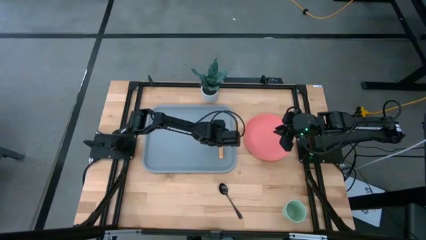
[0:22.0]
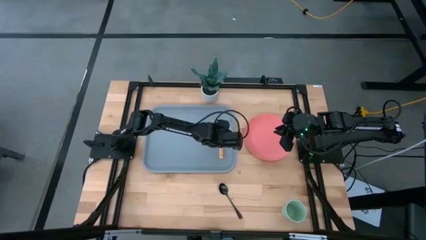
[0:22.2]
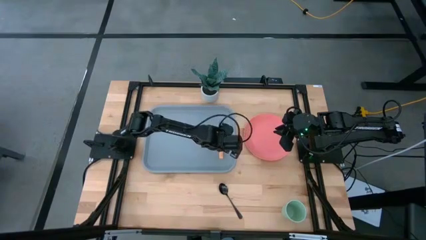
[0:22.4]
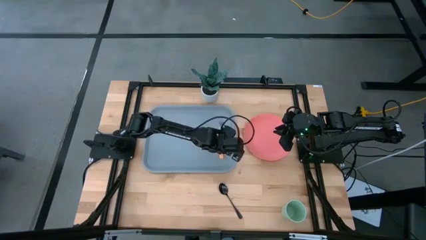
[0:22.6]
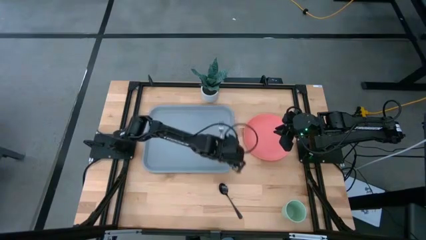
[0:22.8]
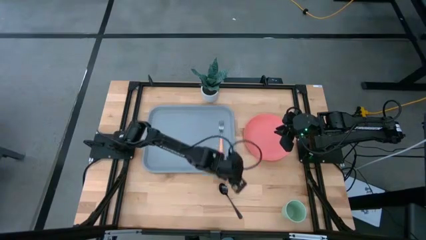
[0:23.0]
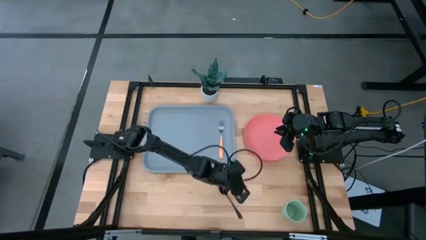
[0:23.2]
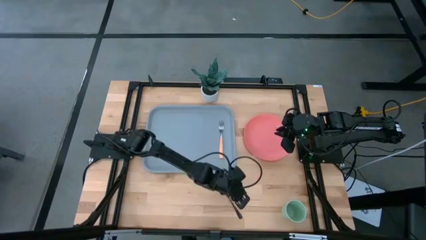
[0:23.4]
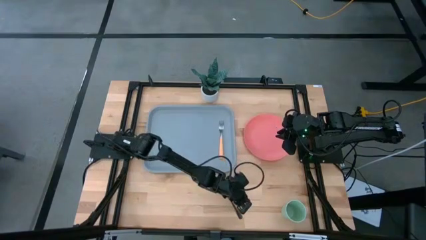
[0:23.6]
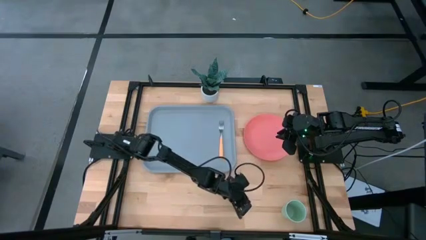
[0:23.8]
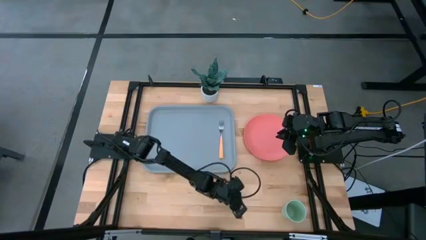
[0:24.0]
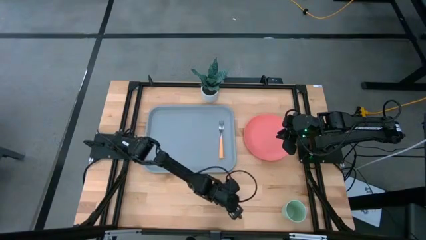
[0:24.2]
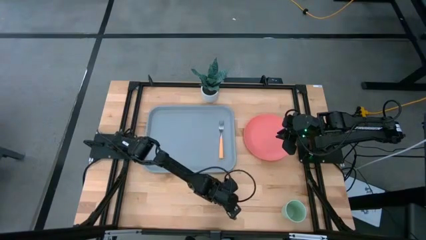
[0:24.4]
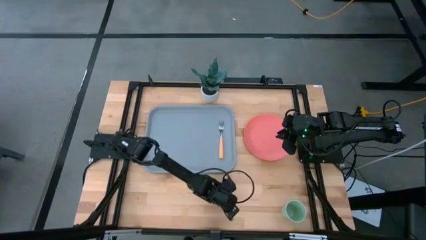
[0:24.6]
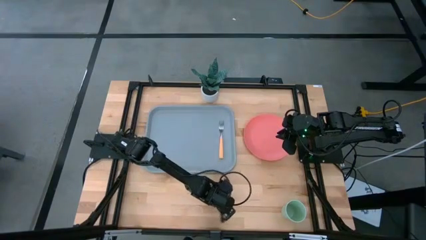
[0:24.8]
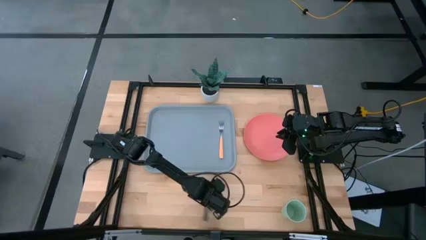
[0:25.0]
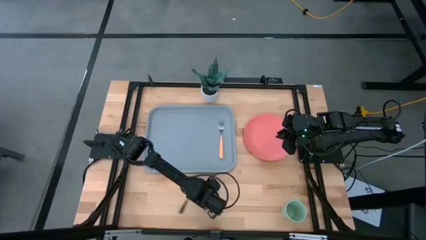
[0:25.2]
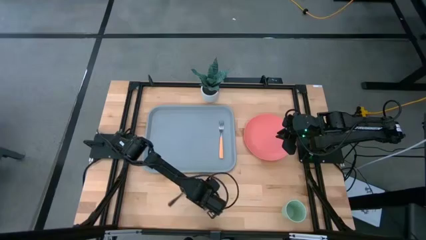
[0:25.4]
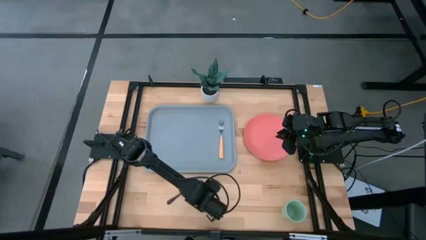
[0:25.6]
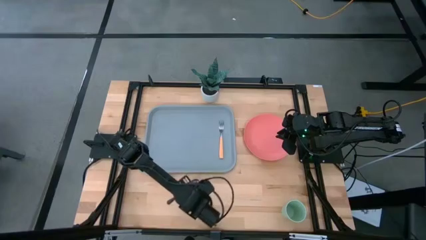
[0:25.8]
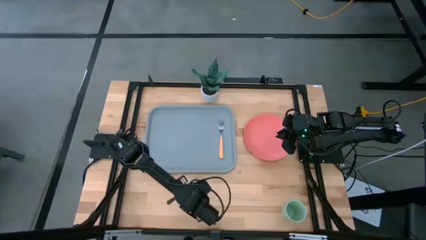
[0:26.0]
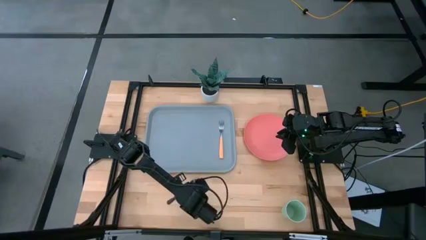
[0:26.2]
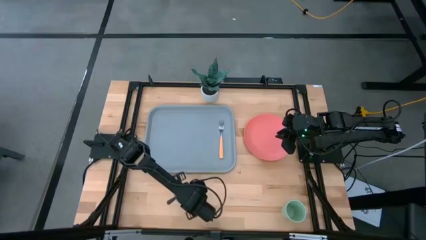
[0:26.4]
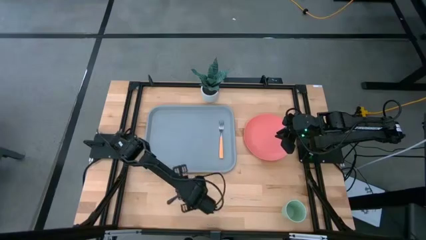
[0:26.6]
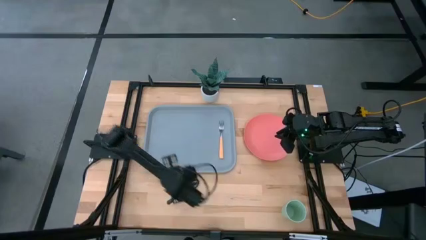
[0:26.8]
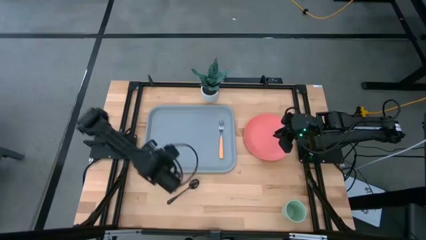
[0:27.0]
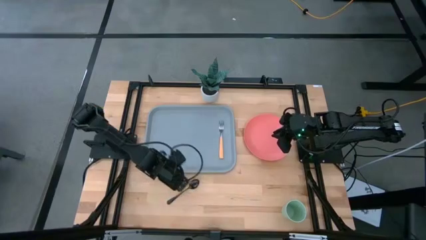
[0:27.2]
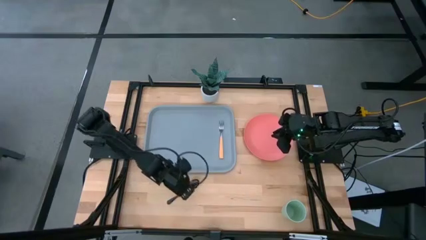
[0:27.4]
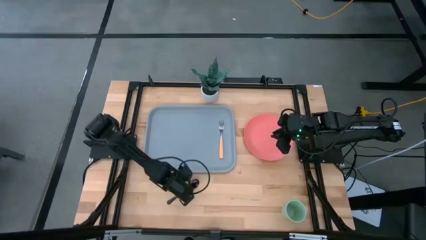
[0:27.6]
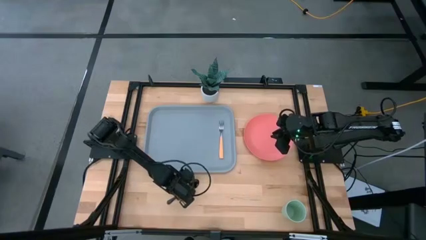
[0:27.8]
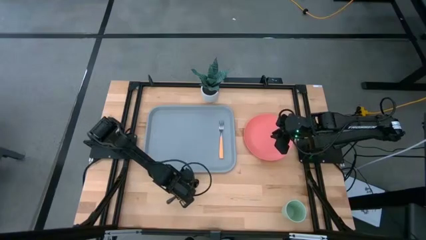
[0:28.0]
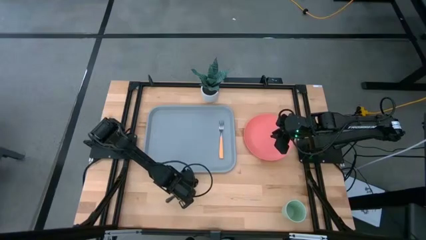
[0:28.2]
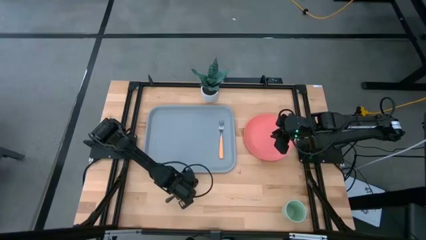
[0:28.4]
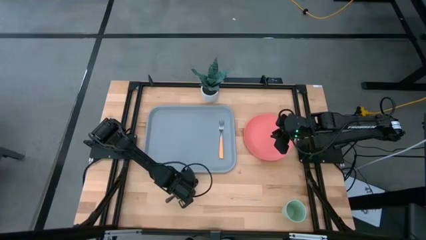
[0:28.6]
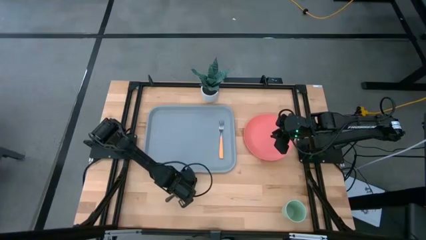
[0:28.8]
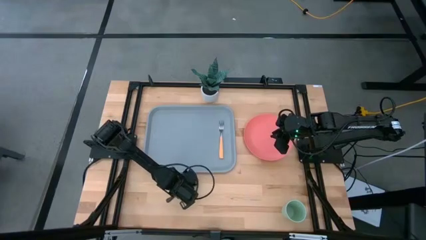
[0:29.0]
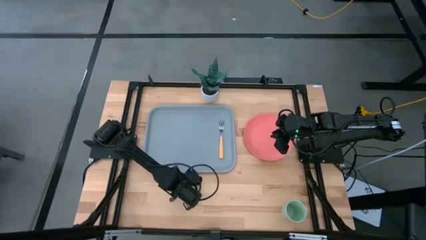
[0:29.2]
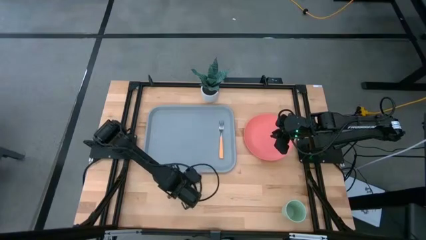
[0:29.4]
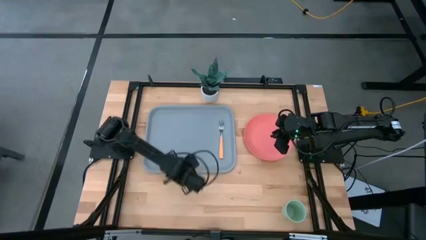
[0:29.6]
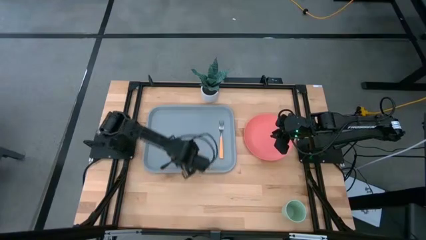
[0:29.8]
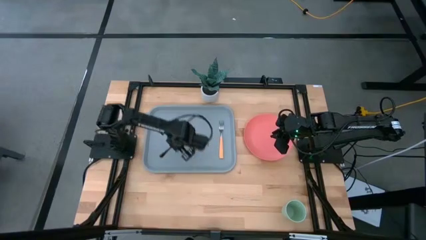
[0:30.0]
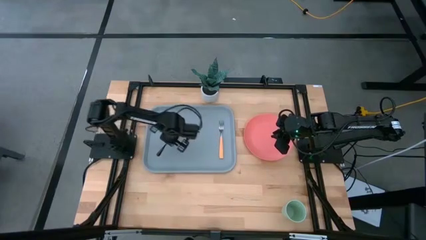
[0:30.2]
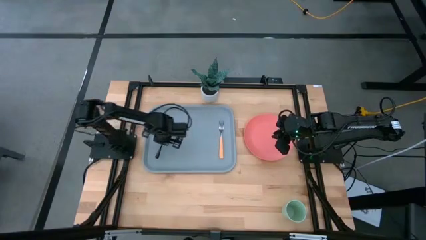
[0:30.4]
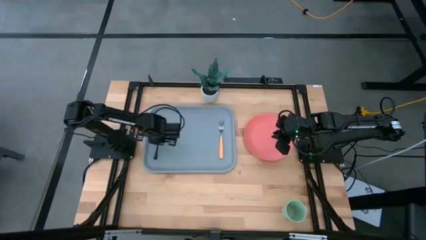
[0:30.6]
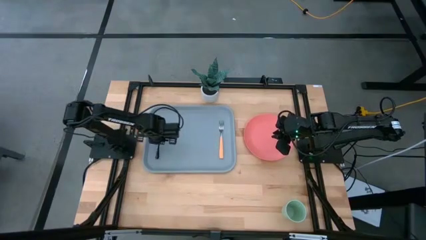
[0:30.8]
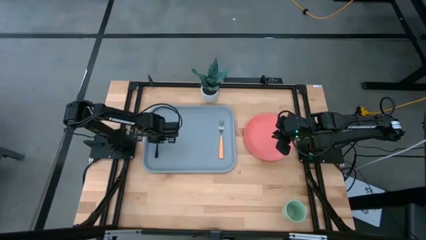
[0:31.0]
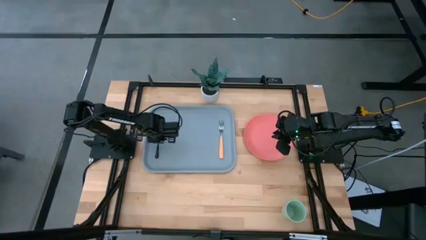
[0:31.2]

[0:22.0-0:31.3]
Task: Pick and place plate/cup/fork/spoon on tray
Put the spoon on the blue tray

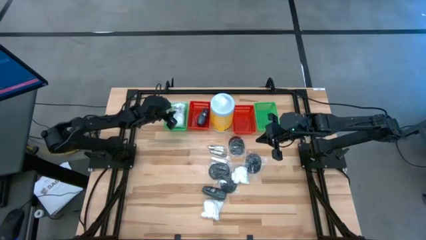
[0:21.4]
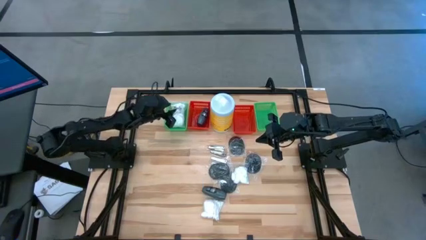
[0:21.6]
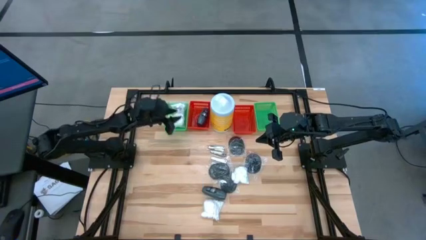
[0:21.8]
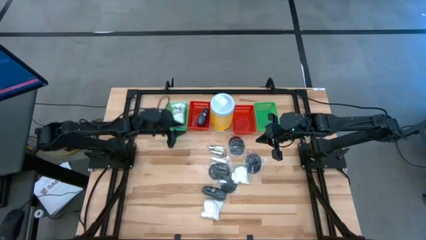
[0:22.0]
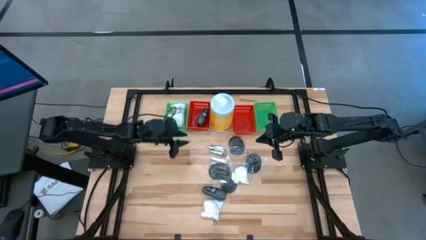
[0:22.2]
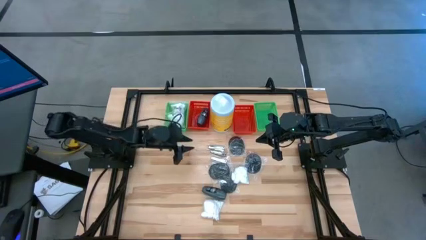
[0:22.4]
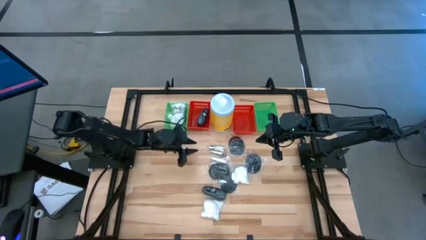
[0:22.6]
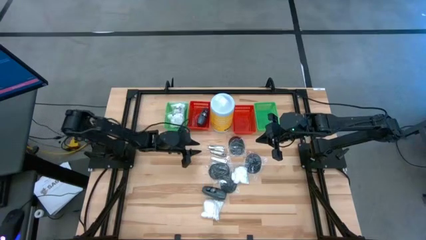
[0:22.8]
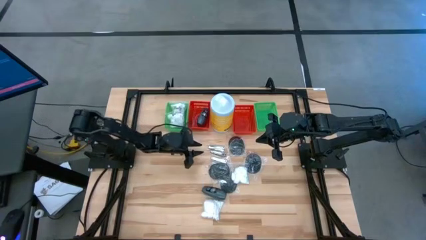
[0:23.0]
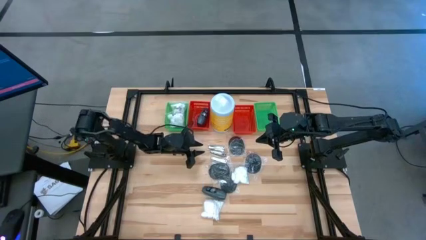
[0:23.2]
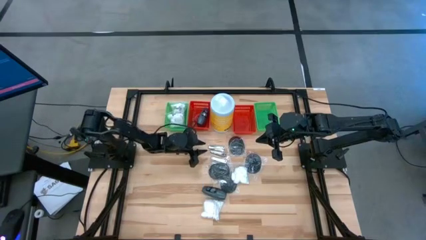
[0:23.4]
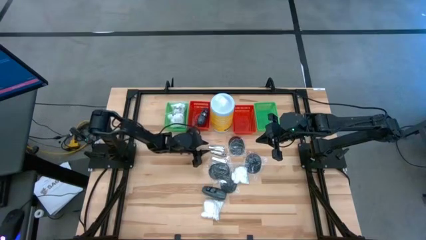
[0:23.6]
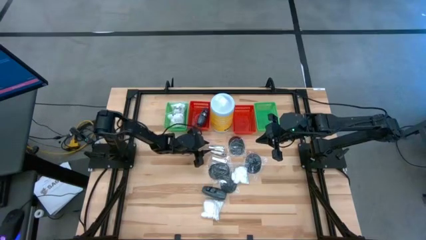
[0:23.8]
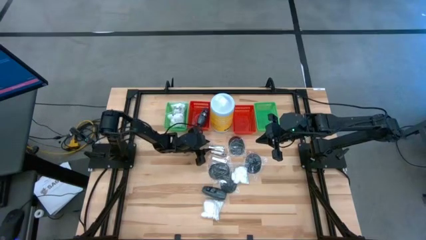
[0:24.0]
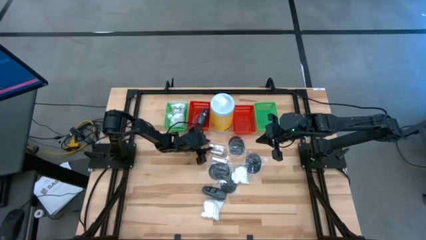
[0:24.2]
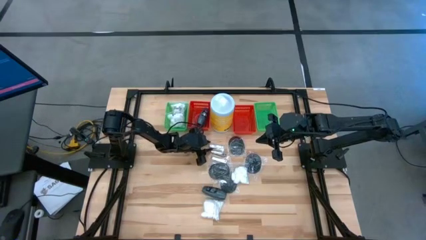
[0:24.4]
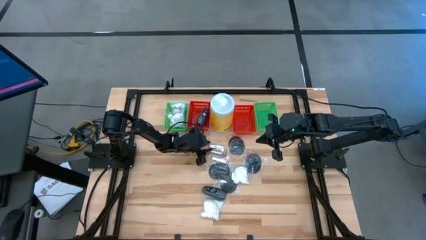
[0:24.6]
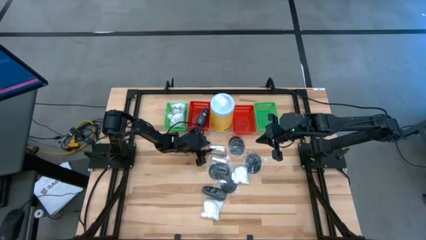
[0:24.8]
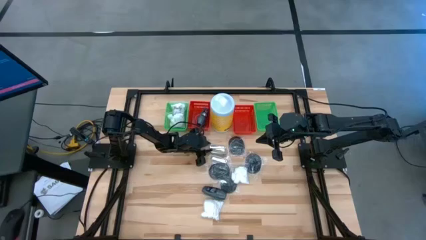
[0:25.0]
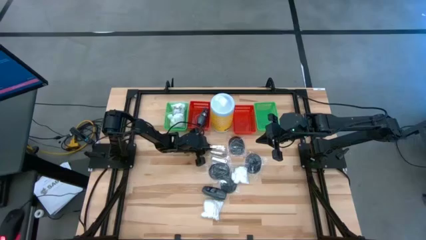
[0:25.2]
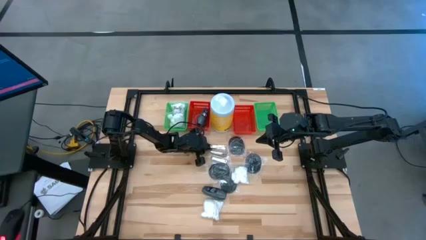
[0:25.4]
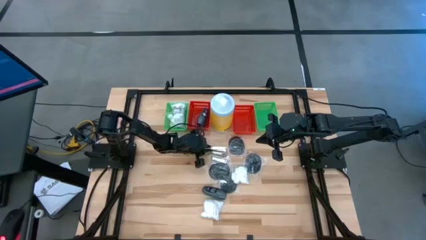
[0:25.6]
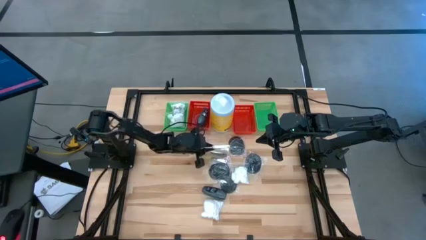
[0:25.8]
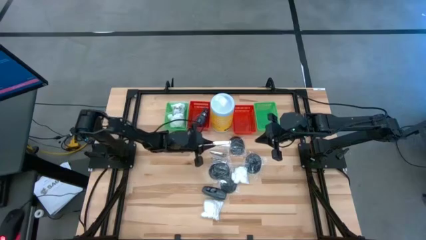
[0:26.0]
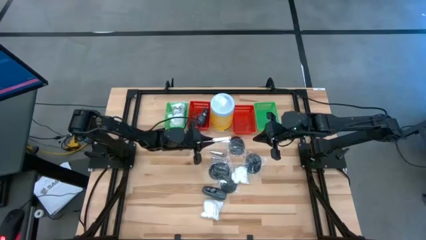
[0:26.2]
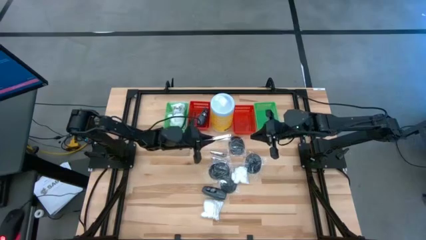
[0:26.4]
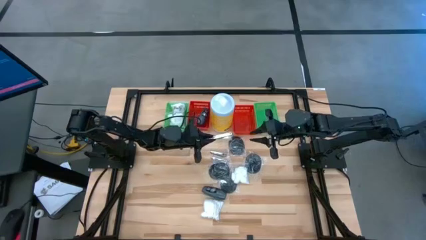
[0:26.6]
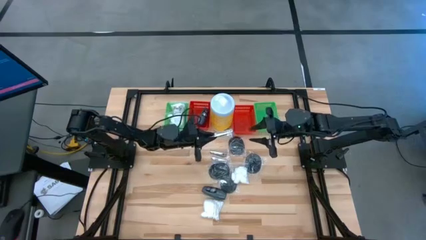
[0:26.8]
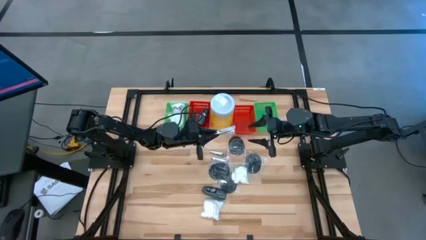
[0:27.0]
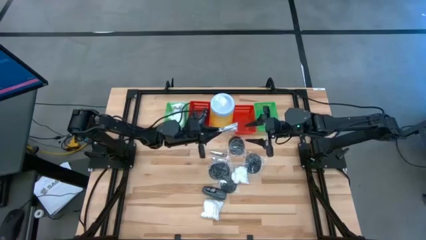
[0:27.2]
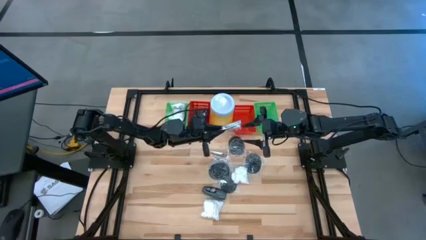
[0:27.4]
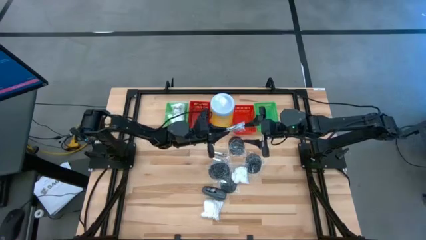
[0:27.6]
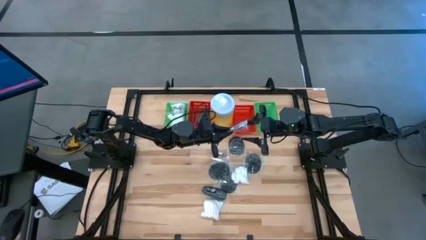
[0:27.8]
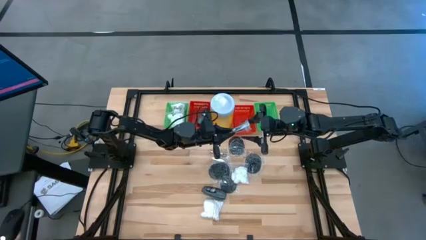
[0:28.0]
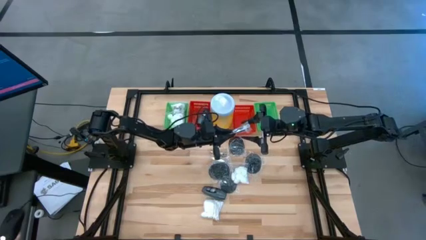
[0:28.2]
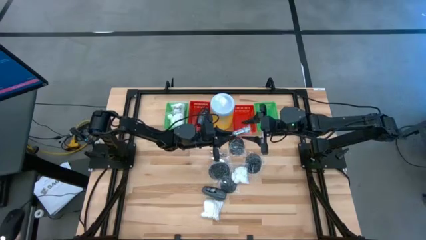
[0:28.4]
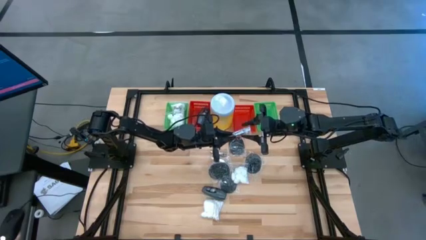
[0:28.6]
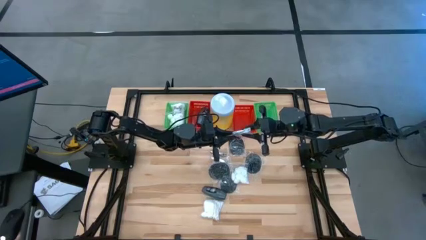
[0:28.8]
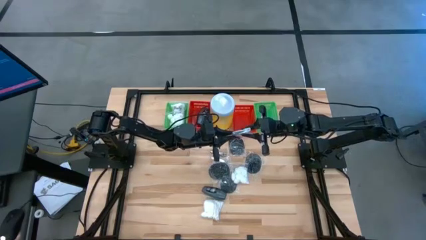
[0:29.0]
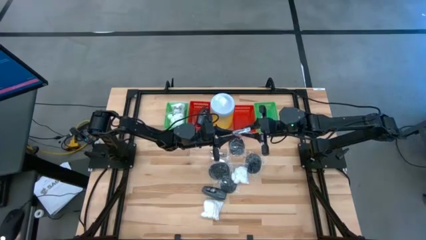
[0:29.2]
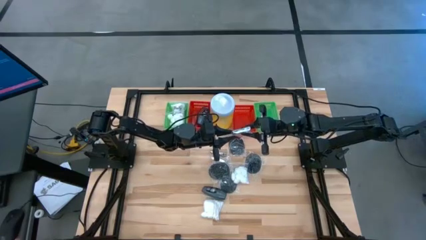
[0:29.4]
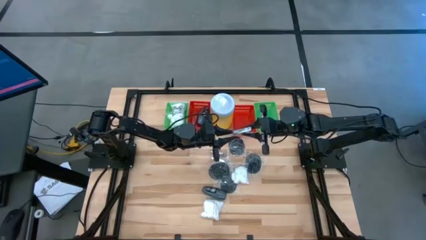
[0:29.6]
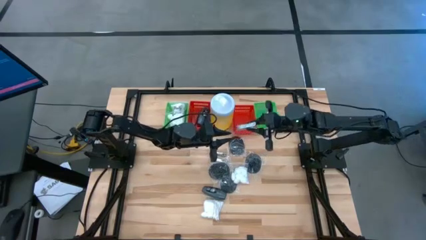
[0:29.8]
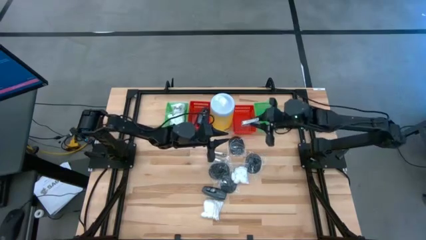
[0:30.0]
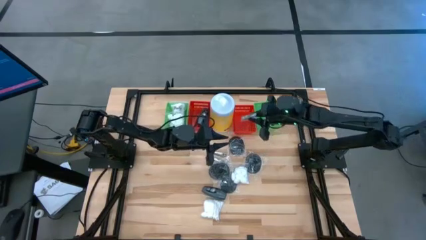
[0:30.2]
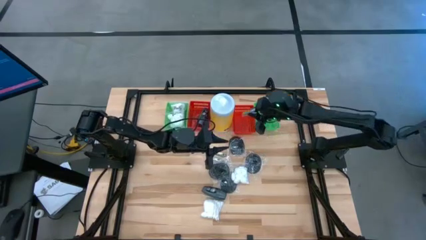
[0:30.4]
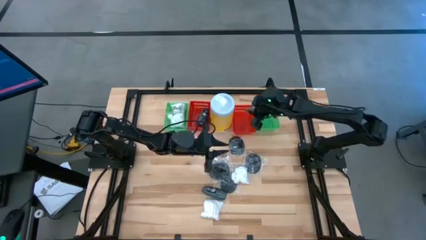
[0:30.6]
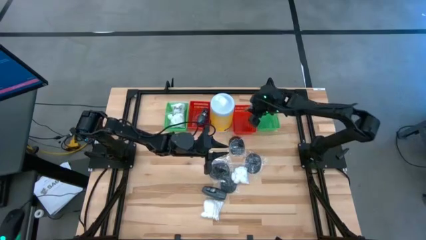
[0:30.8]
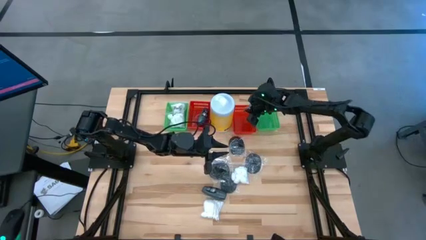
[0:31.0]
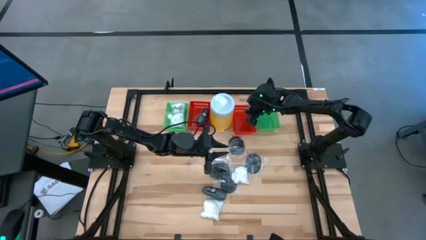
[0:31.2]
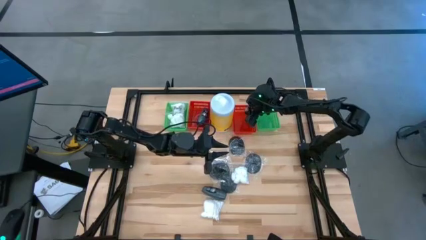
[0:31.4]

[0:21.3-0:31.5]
Task: Pick & Place Travel size toiletries
Put the silver nail cutter into the right red bin
